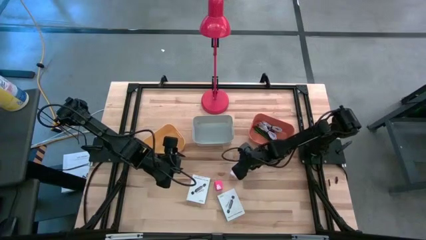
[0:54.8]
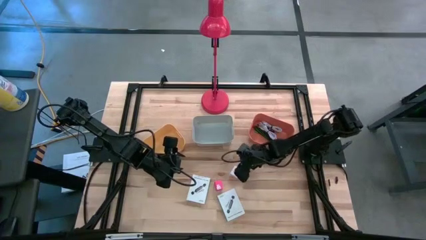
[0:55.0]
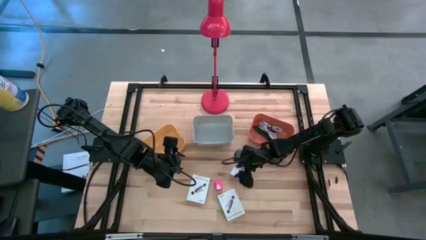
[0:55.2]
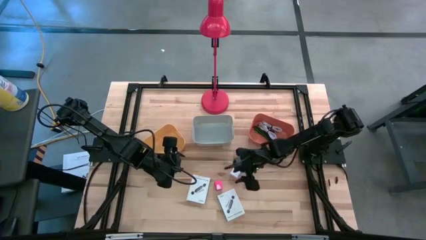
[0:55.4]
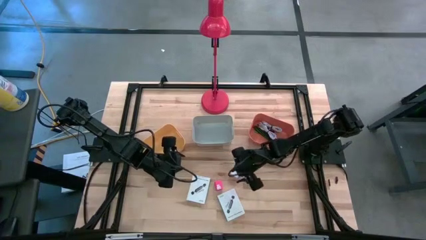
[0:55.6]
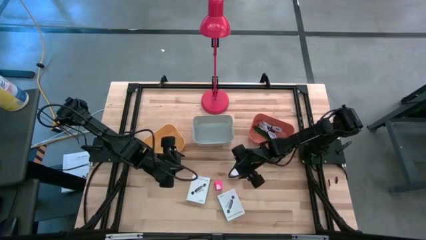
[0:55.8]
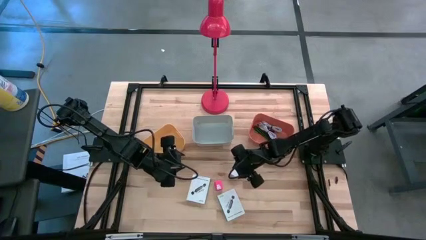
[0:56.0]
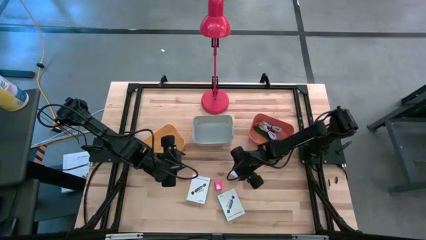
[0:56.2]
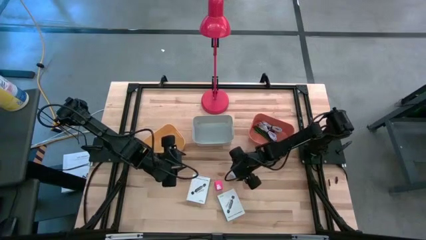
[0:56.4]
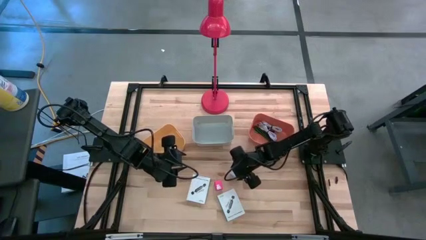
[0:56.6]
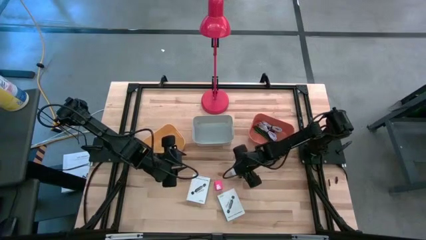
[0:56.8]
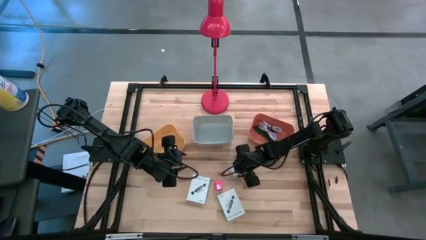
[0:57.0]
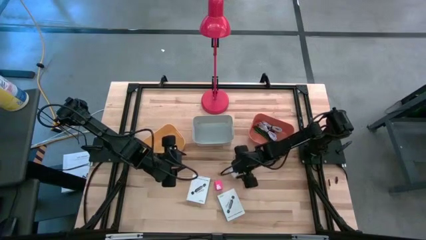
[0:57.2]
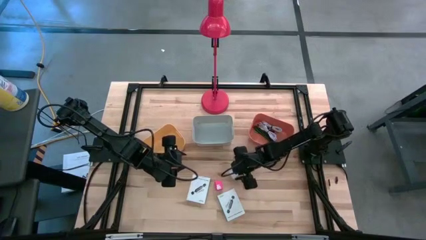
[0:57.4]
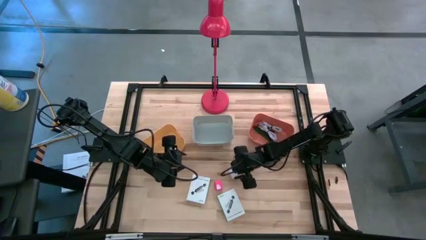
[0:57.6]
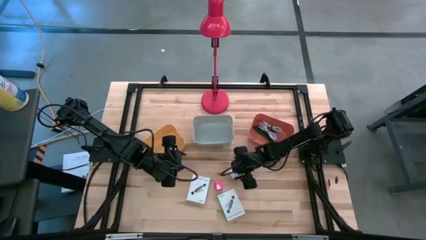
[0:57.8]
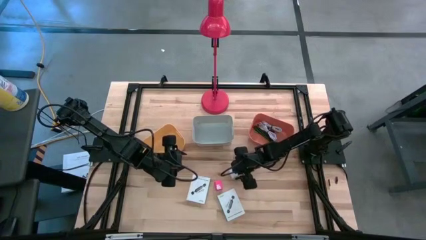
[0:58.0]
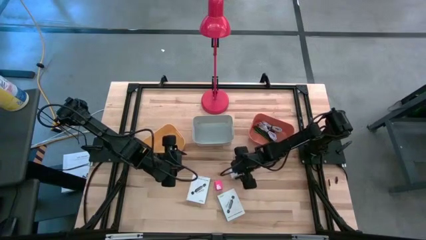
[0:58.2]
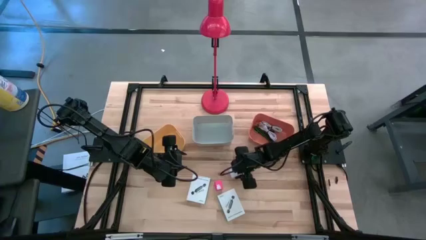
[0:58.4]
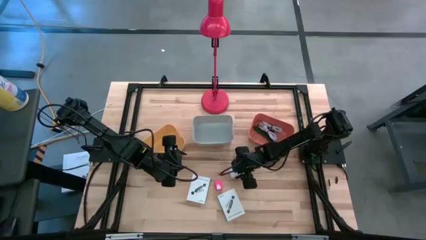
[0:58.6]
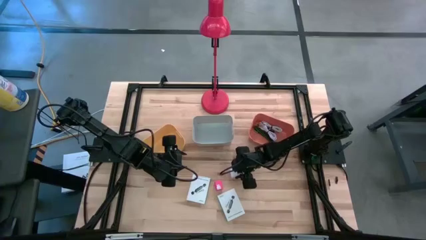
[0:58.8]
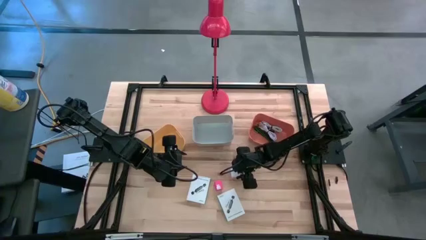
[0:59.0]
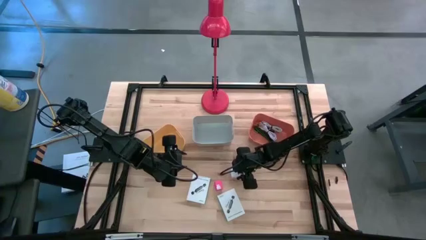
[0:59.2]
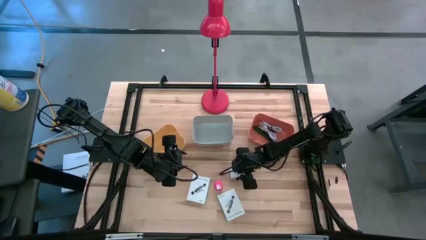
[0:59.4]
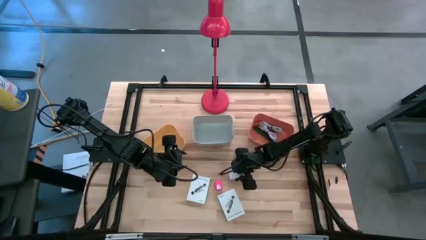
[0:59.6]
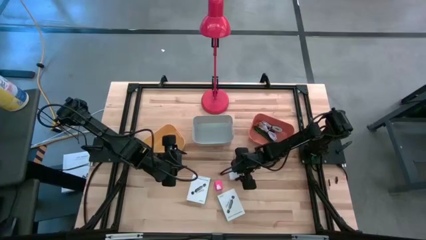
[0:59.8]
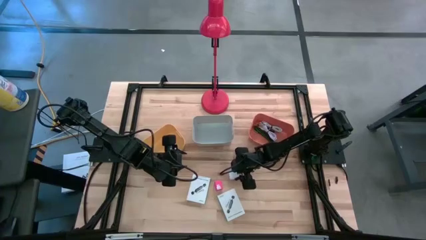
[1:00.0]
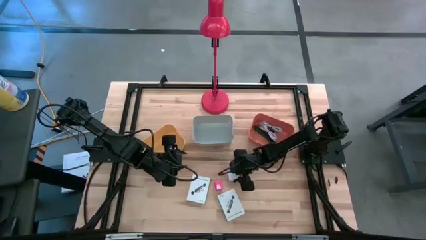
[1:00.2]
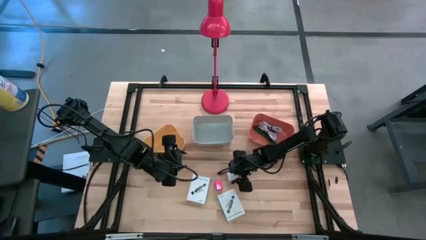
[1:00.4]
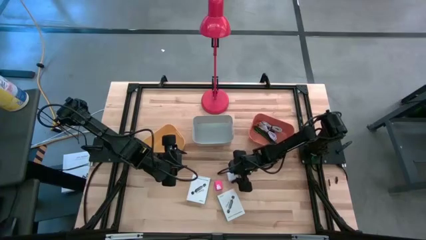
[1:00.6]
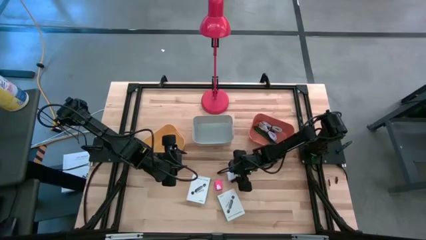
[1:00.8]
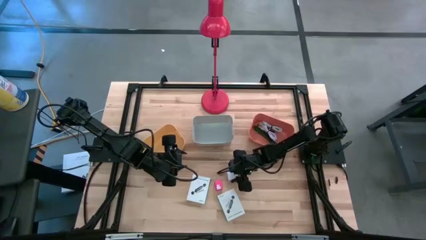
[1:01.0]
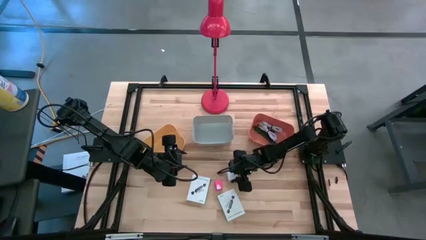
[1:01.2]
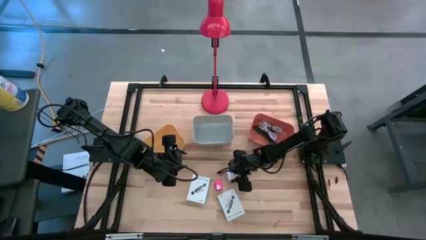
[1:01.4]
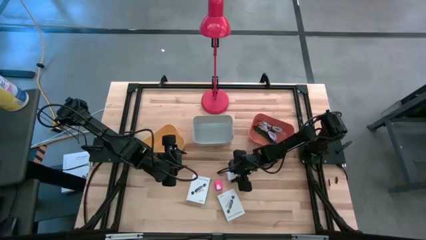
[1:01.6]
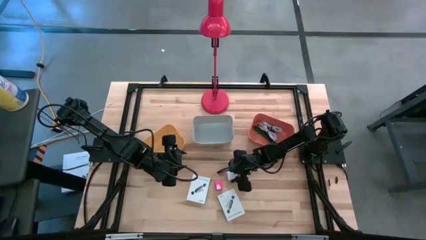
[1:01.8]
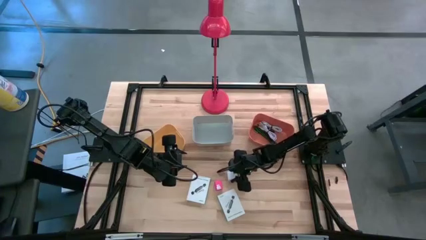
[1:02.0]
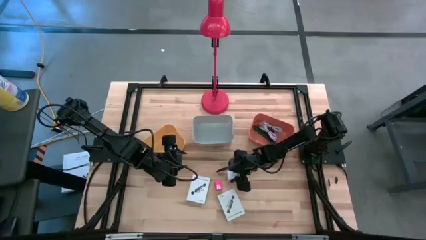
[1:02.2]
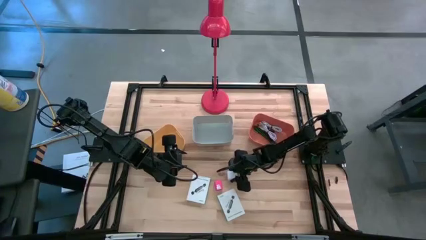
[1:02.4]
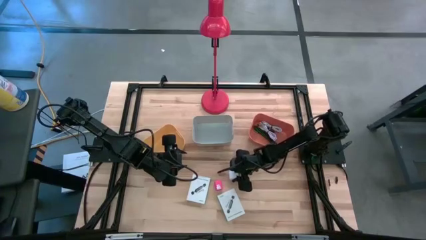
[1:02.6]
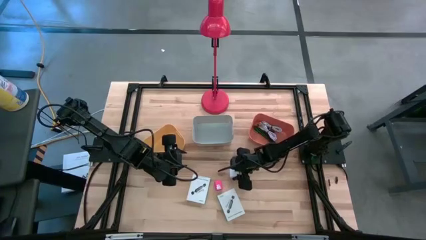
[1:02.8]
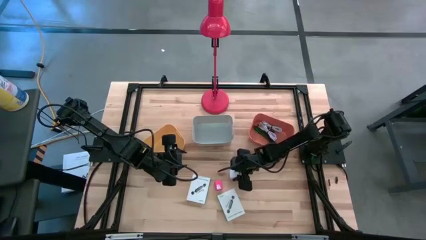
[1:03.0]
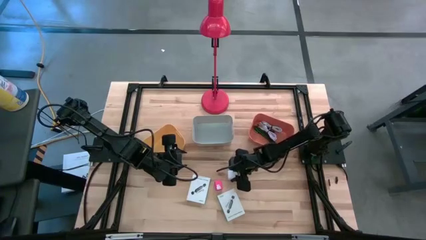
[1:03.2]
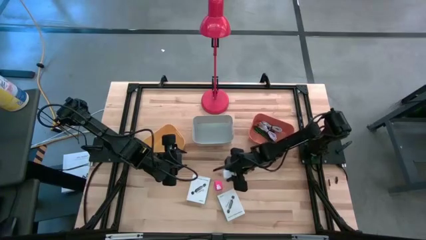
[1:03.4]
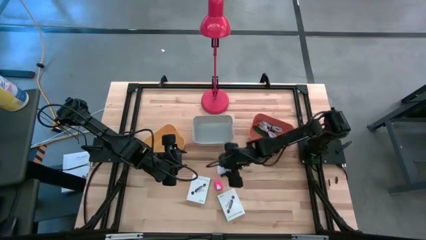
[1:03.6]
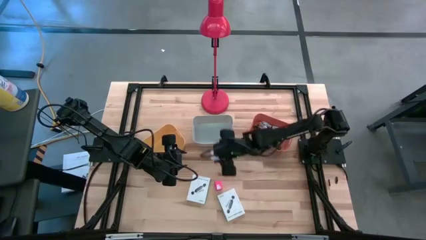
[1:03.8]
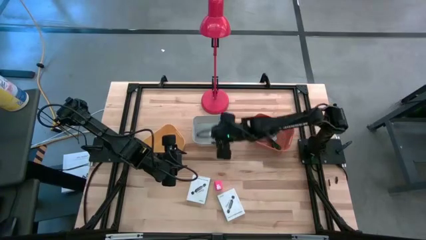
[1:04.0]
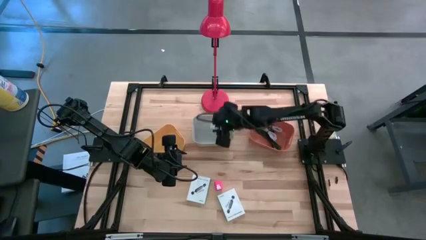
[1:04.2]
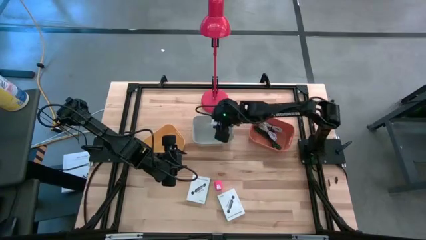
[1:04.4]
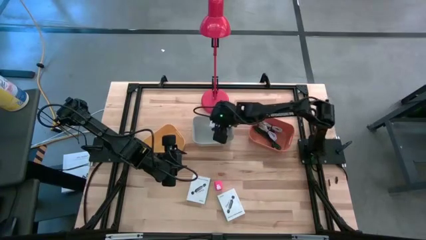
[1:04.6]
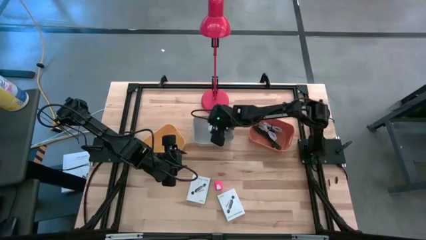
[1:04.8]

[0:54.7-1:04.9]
Task: Pick and place items into bin
Put the white charger adapter into the gray bin
